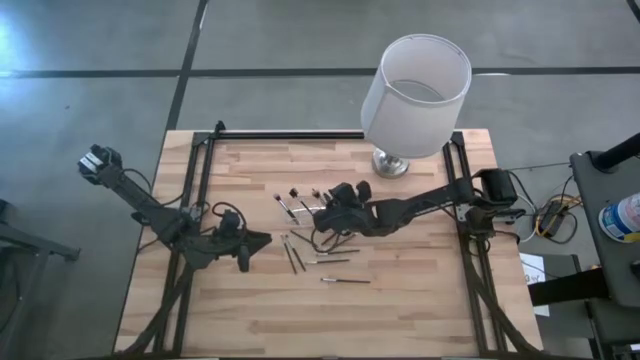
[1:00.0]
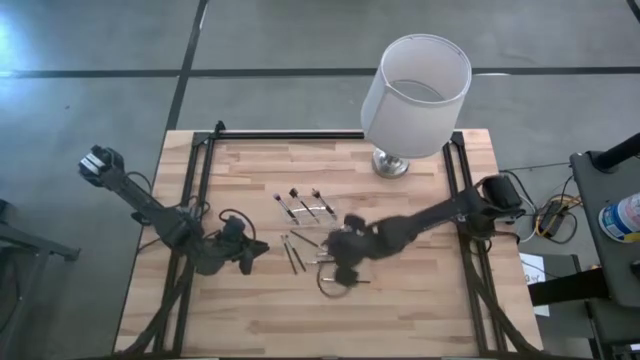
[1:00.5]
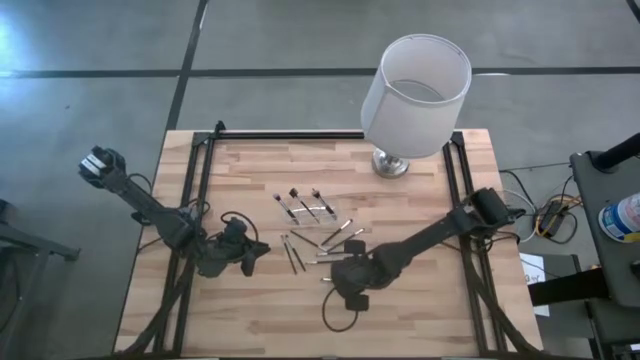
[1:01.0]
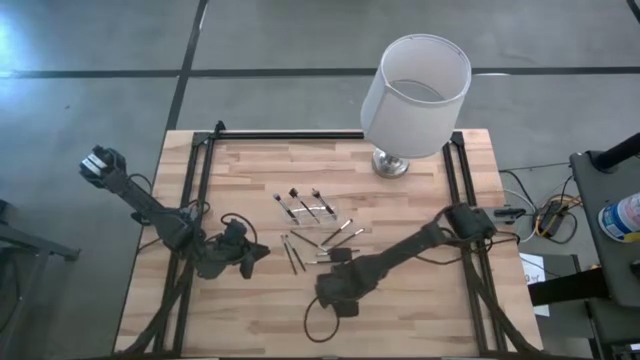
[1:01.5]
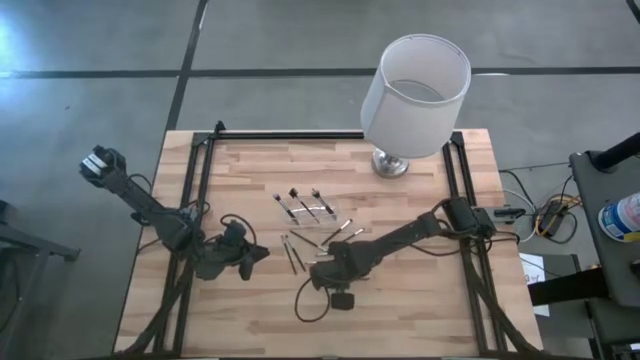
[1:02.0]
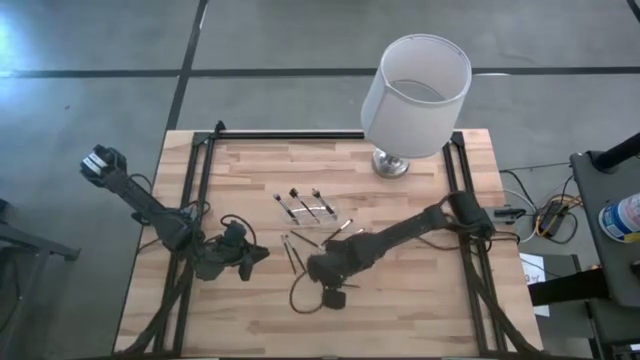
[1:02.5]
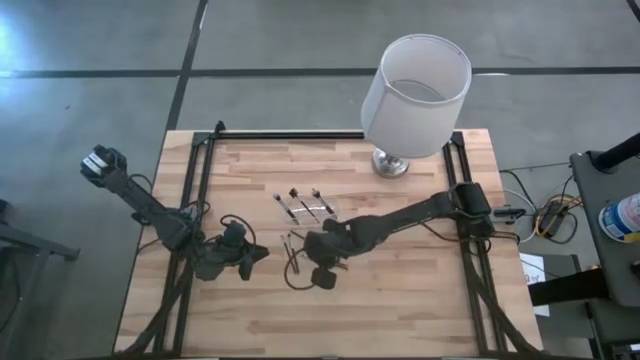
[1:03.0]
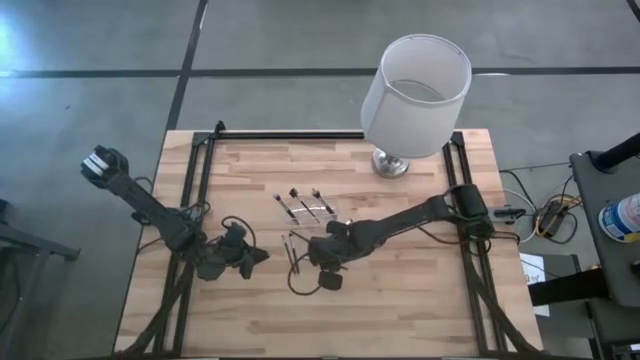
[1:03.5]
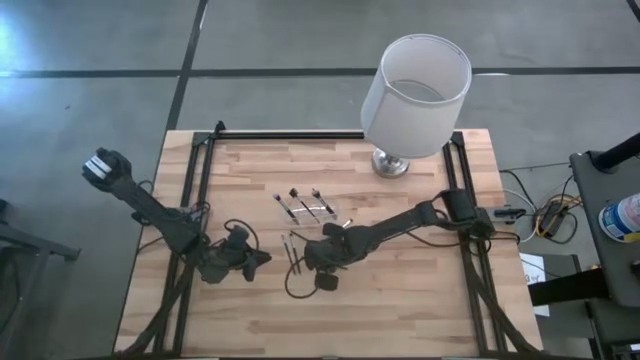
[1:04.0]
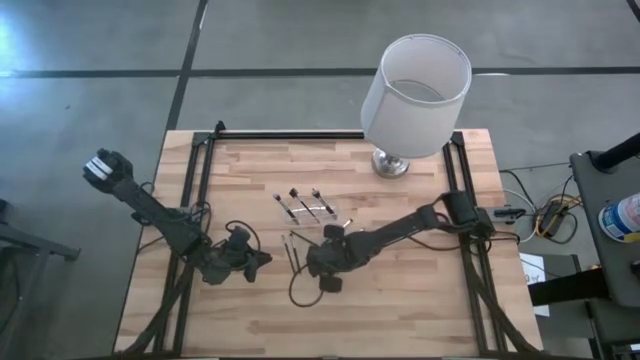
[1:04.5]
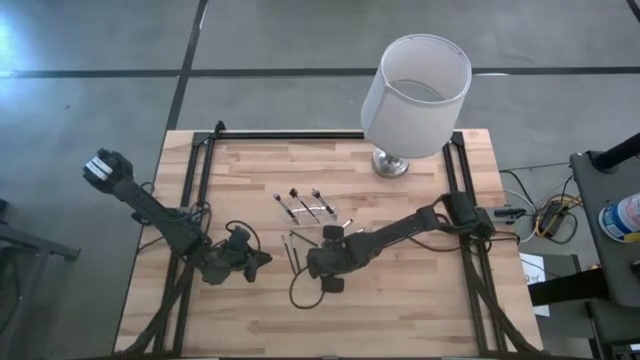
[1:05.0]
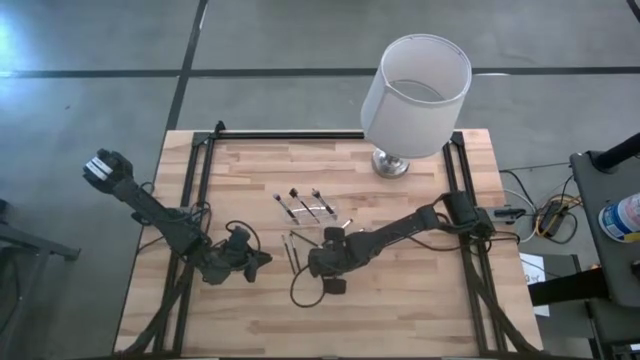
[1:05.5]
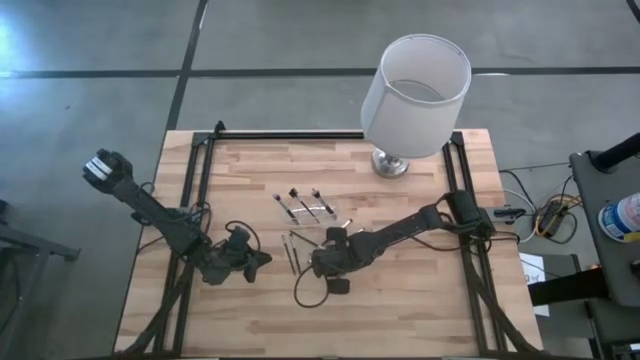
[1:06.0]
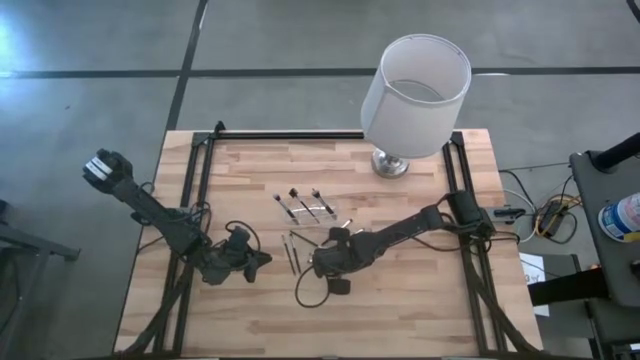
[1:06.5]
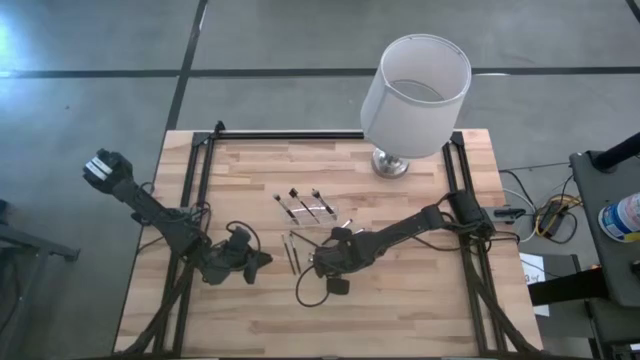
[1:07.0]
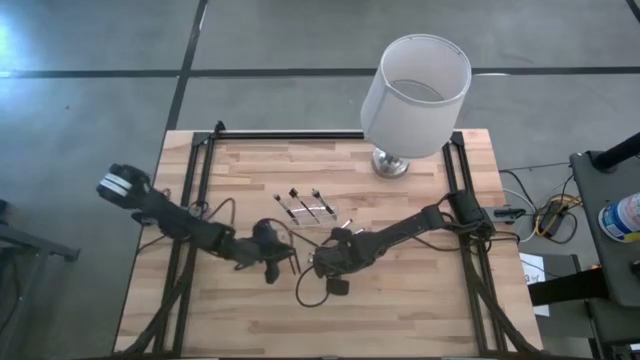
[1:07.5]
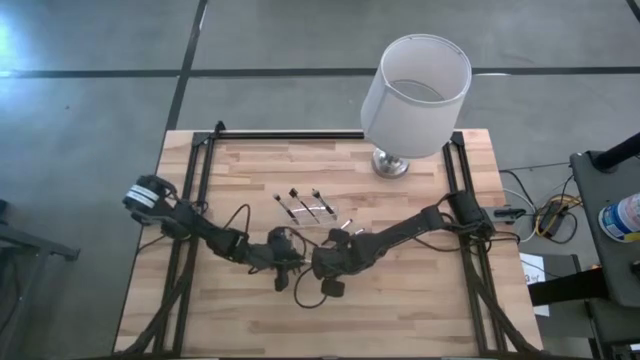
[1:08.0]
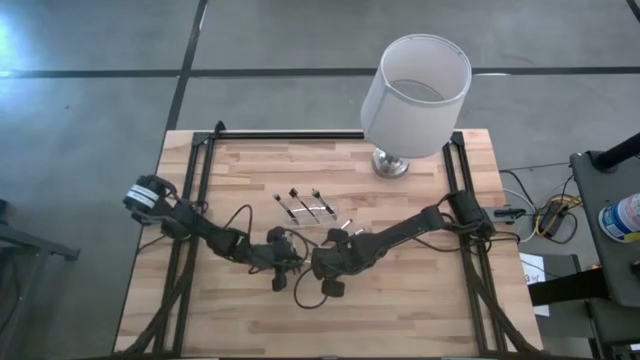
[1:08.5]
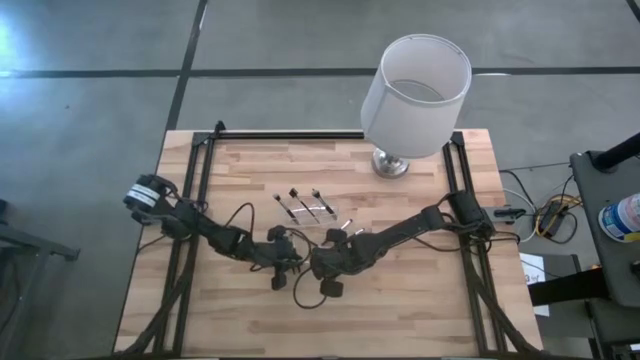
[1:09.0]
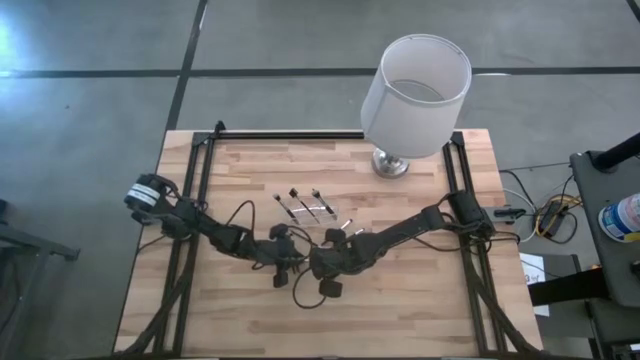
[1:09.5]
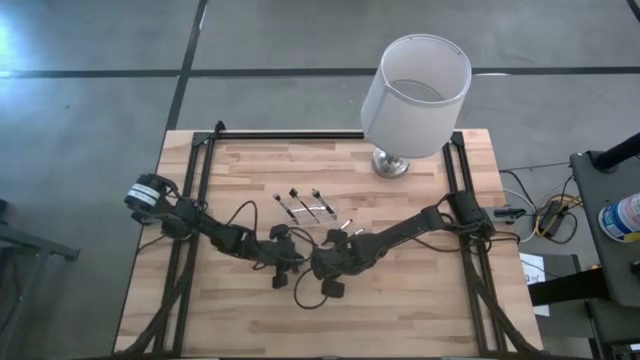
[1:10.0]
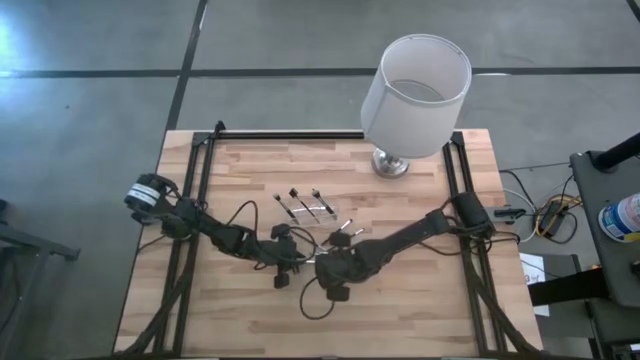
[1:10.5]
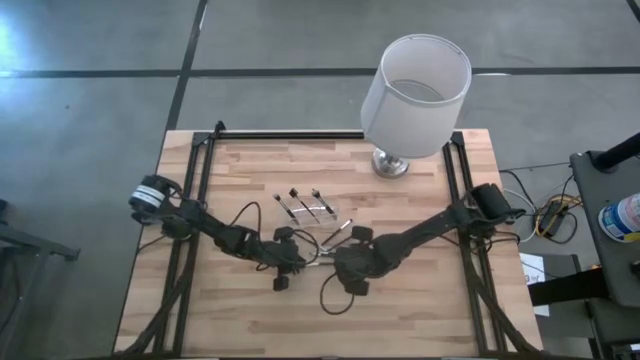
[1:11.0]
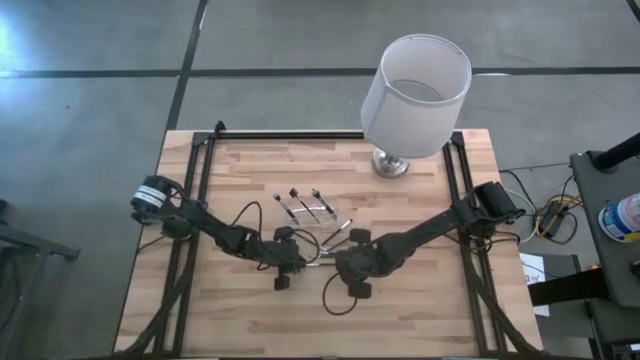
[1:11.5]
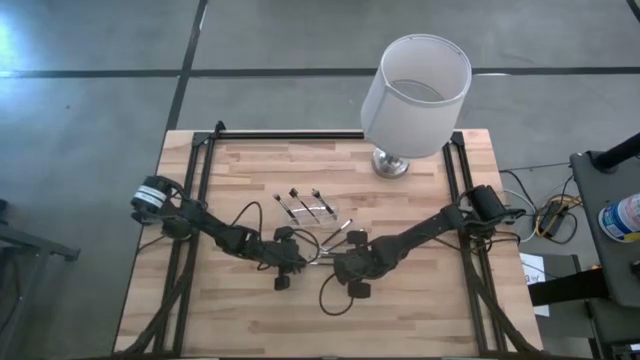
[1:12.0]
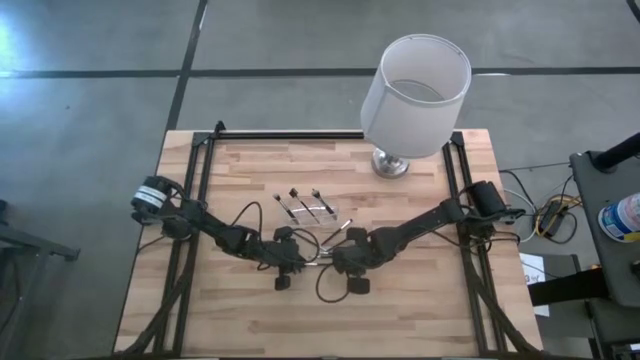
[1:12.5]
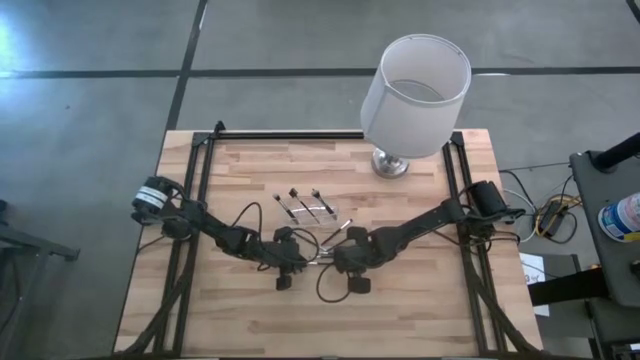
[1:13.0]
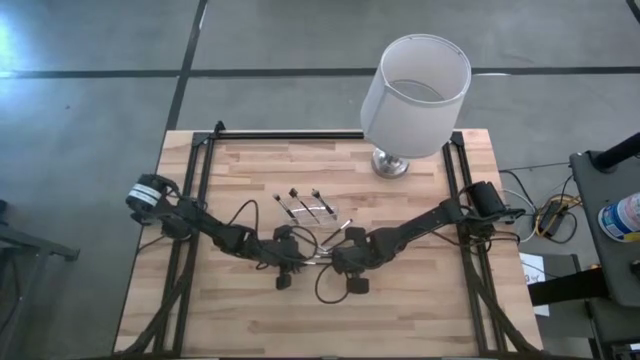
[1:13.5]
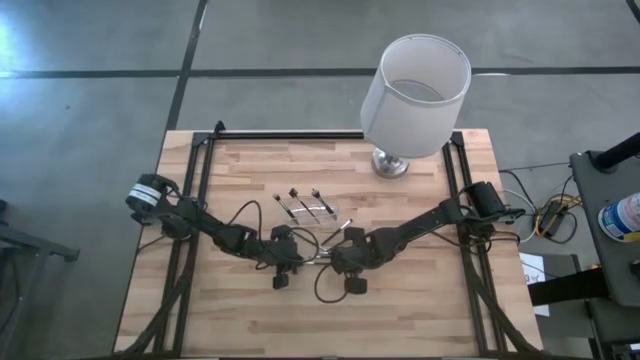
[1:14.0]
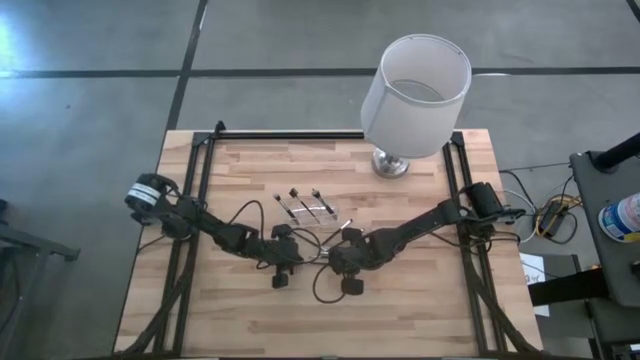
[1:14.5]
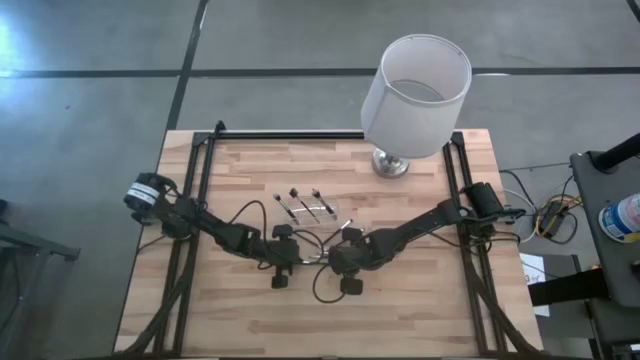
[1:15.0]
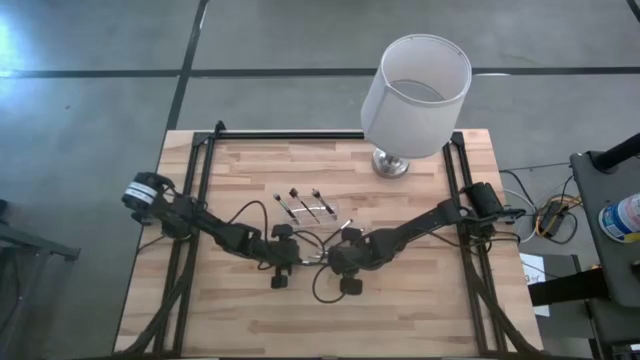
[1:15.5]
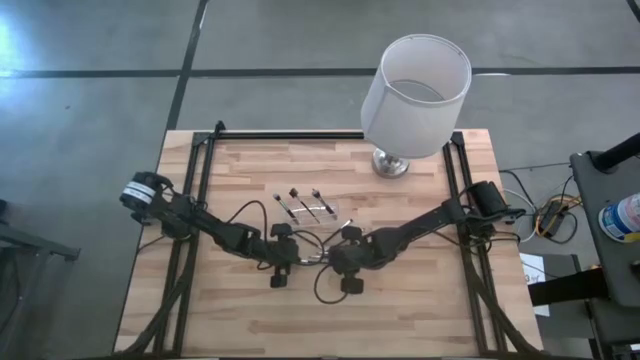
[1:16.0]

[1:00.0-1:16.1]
Task: Put items in baskets/containers
Put the eyeshadow brush into the transparent organizer

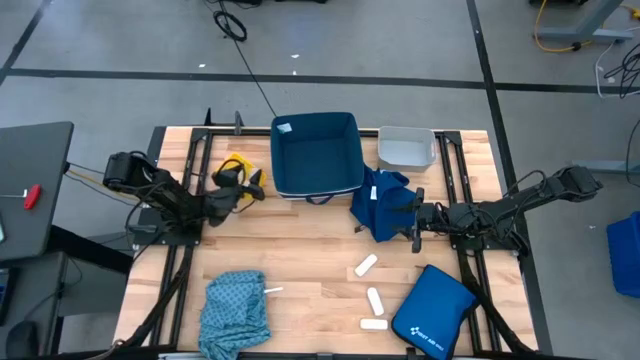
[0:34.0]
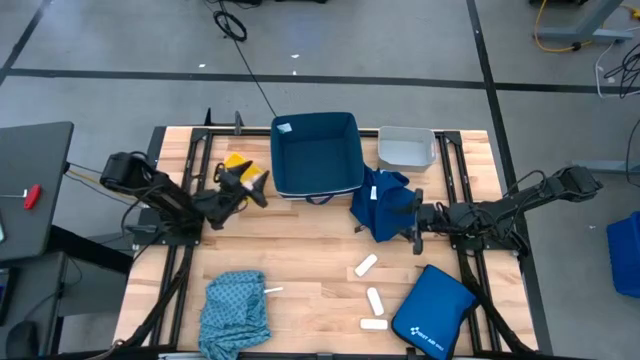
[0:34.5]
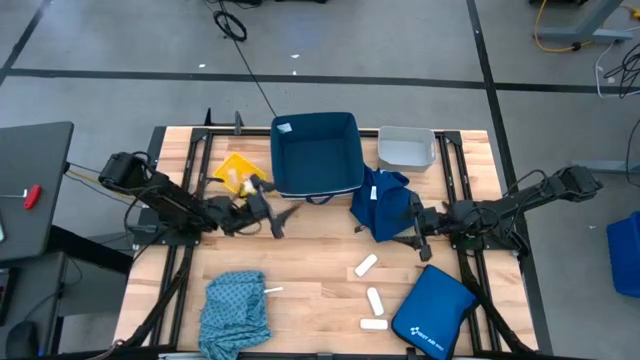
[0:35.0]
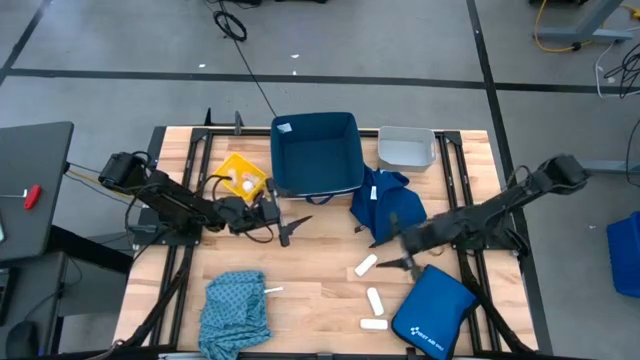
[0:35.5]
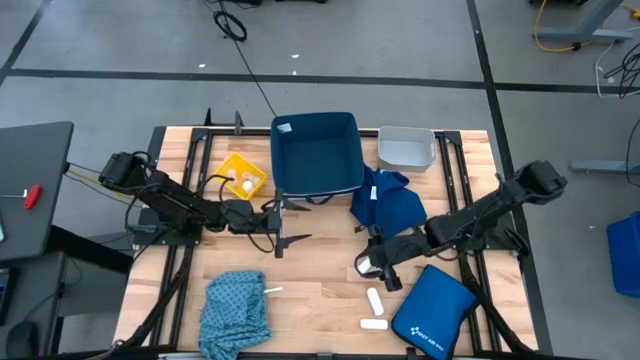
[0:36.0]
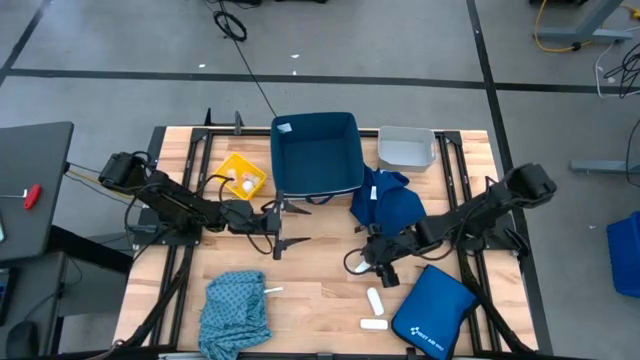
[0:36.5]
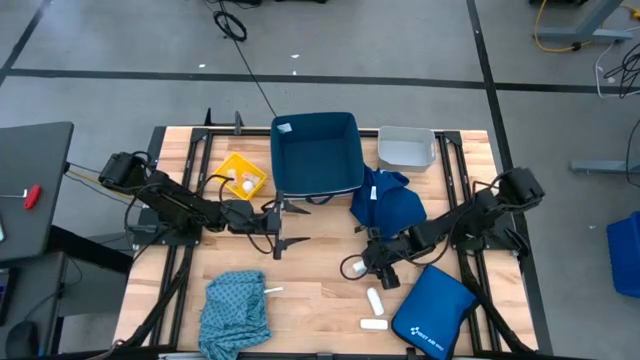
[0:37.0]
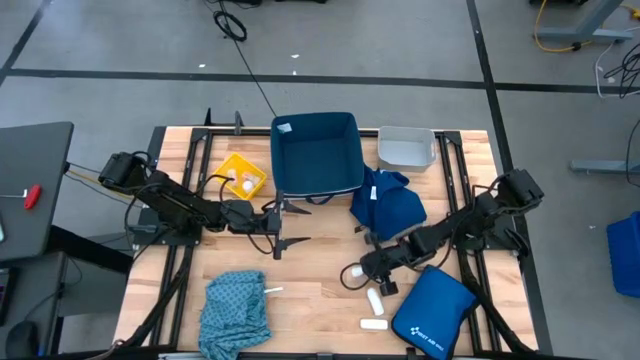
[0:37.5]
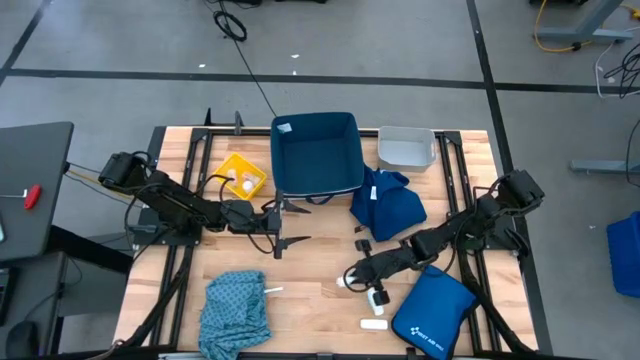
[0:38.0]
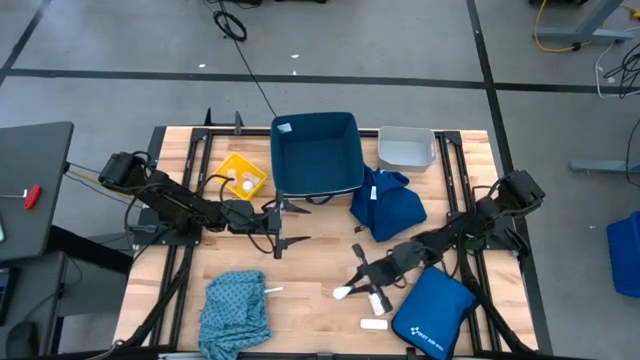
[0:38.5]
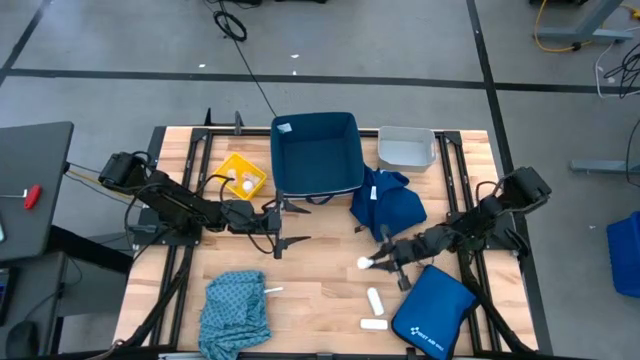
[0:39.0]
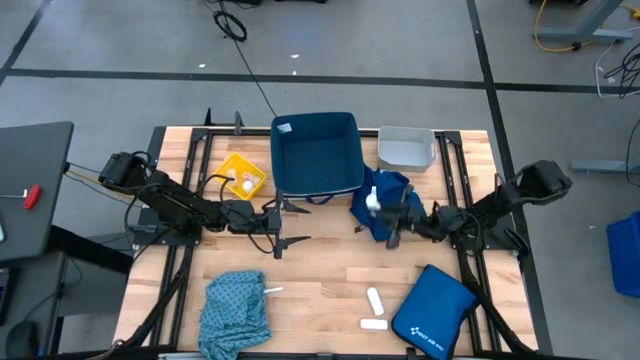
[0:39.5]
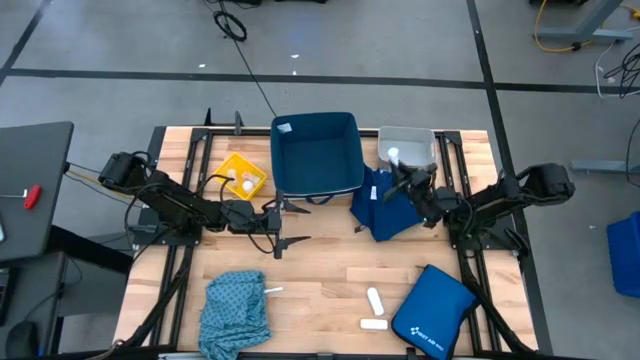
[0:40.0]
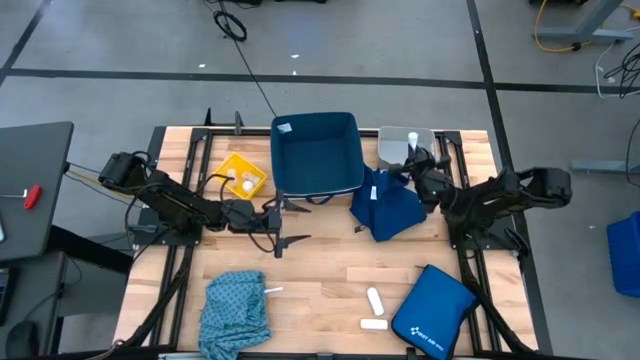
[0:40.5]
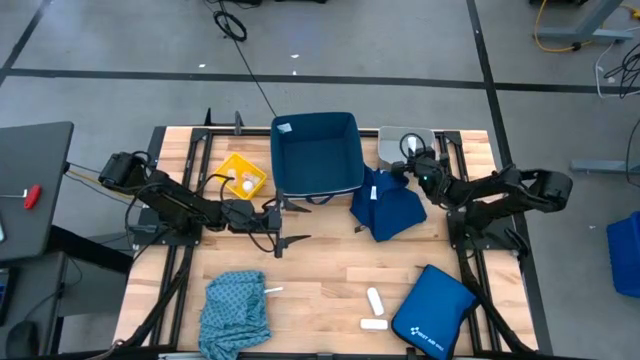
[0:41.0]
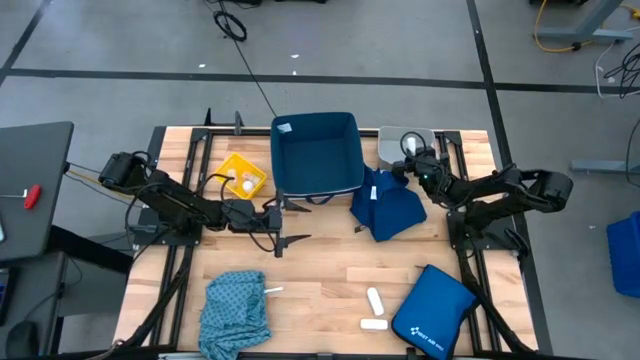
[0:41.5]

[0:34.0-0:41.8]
Task: Pick & place medical supplies in basket/bin
Put the top white bandage into the grey bin
